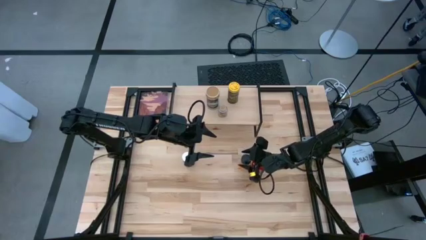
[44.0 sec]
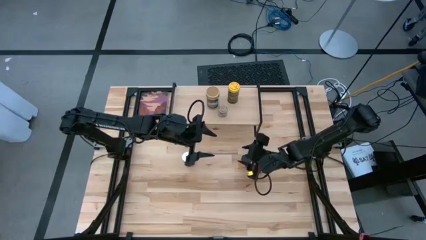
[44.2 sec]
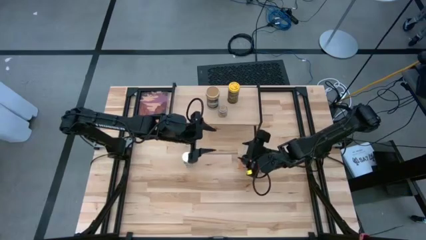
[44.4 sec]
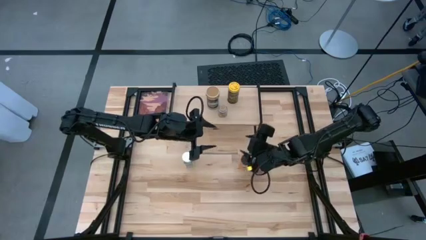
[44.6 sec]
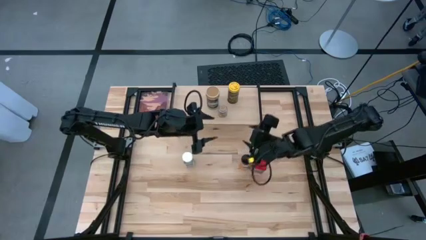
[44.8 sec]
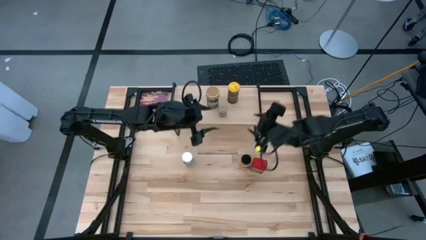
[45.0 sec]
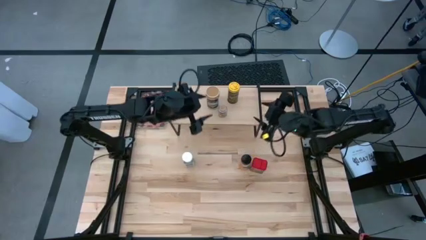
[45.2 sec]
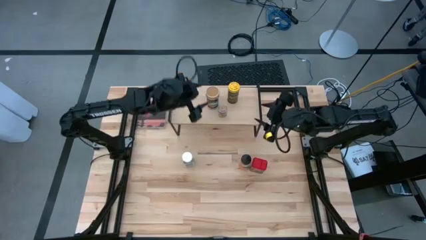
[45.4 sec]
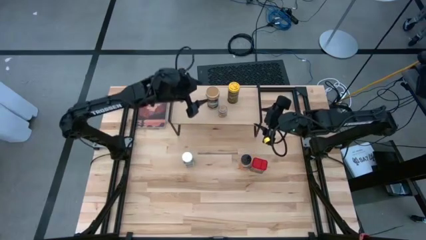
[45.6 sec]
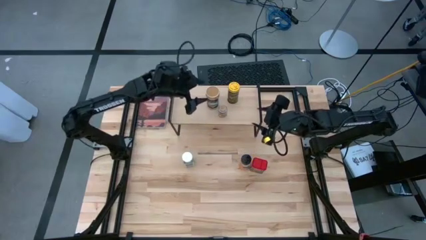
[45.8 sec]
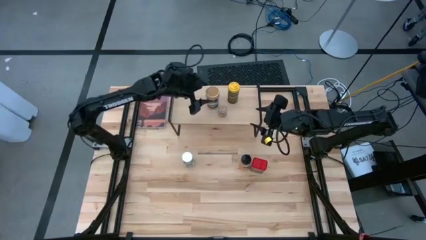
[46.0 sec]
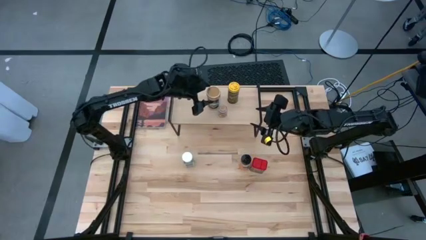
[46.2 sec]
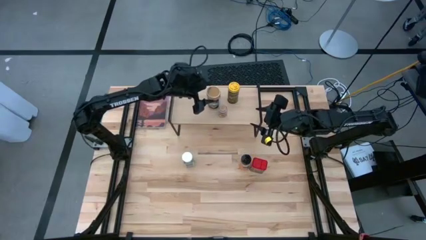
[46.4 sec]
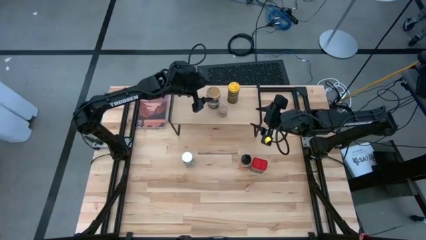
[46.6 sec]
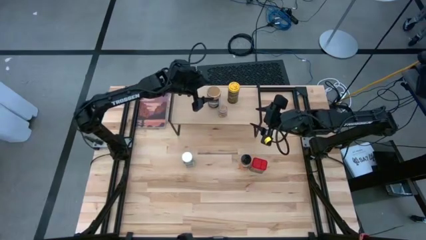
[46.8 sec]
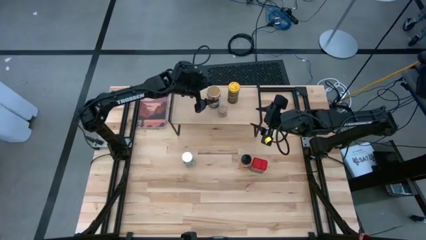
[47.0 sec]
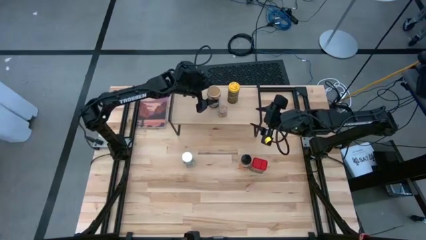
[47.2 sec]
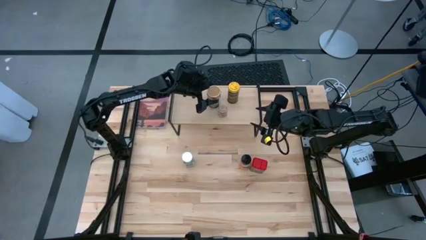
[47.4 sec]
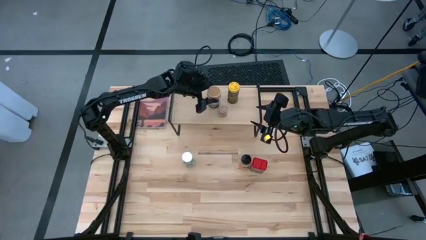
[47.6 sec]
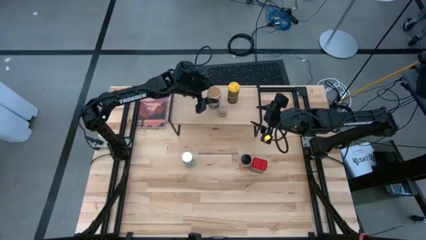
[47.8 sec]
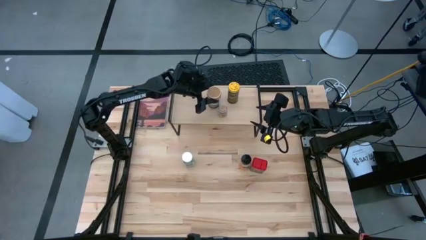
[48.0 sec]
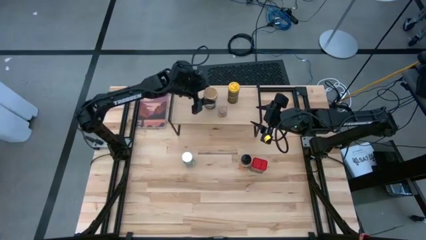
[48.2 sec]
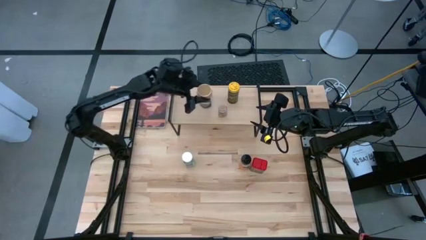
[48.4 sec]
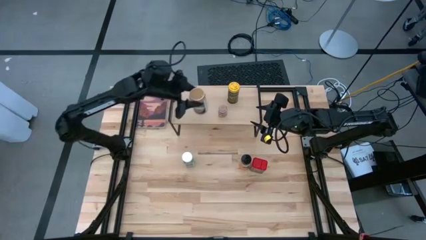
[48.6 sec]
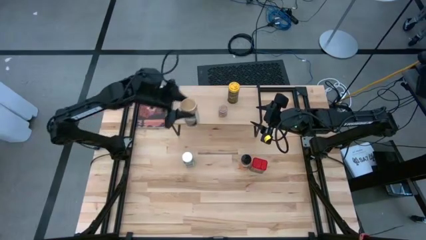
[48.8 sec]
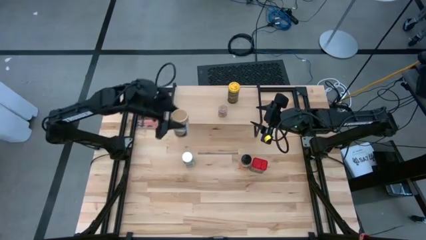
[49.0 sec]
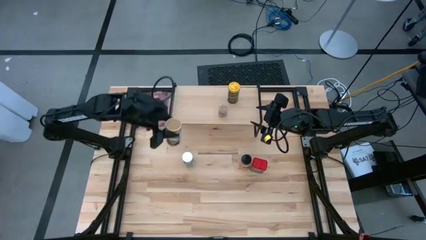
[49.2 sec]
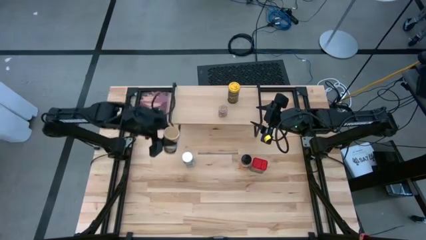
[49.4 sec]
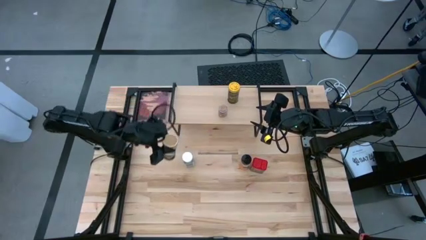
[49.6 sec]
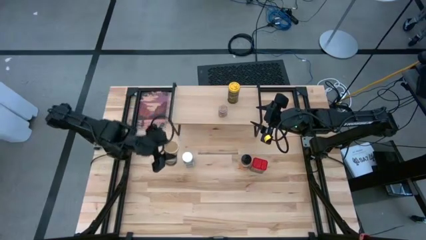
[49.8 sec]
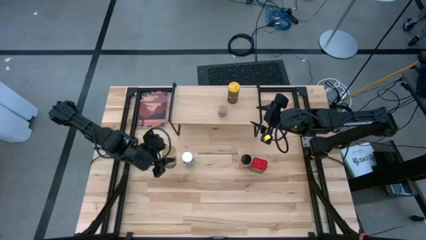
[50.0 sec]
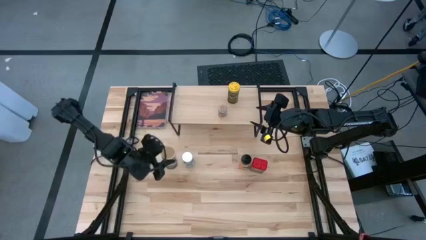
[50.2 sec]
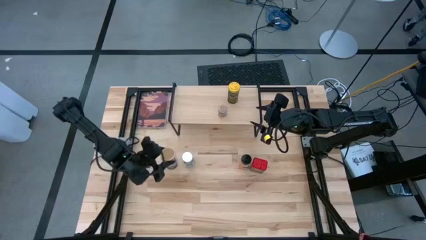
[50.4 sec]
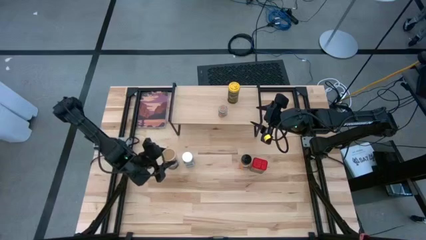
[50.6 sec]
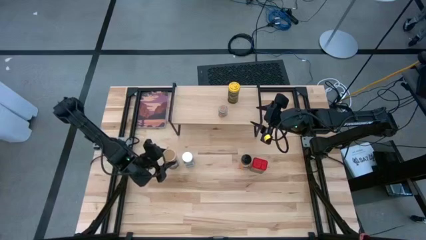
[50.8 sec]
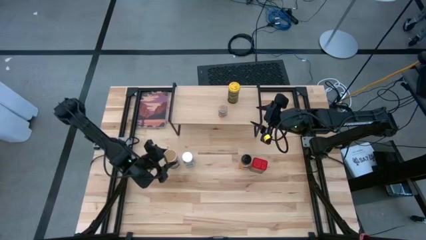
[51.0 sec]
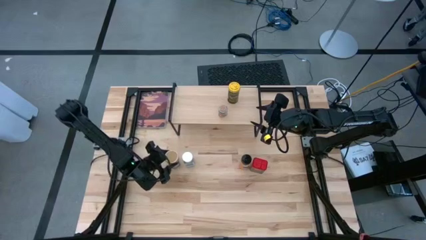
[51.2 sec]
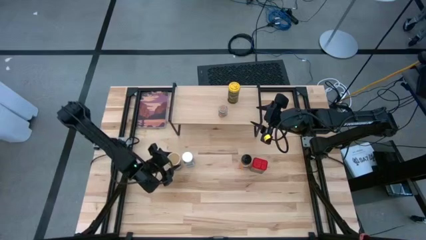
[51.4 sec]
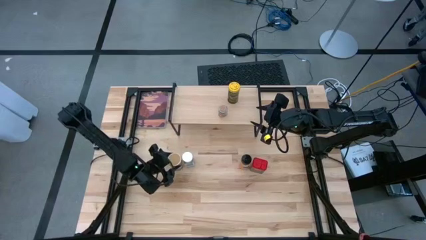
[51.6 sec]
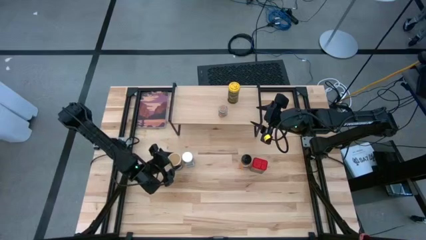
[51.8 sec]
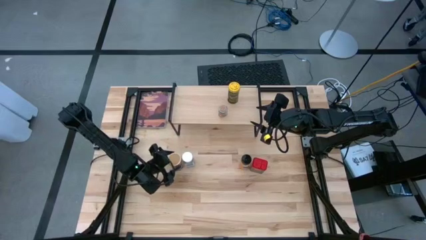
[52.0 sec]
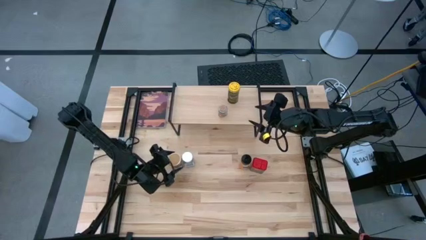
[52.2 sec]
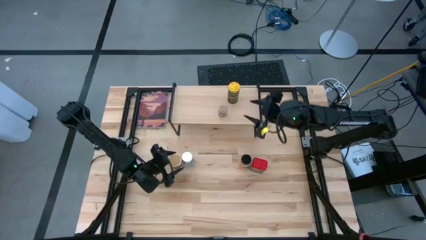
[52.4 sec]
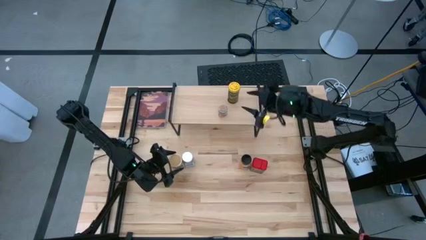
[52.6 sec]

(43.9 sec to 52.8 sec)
Task: Shelf spices
Remove the golden seasoning bottle from the shelf

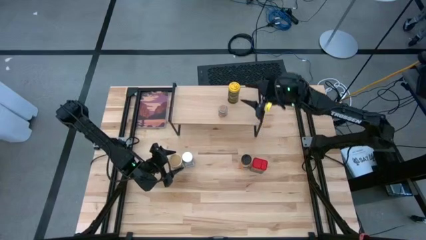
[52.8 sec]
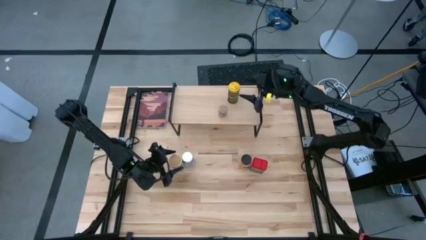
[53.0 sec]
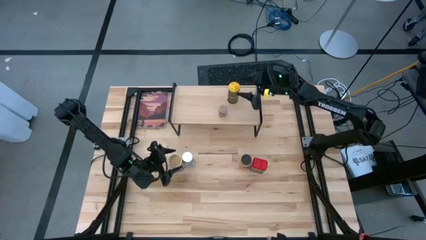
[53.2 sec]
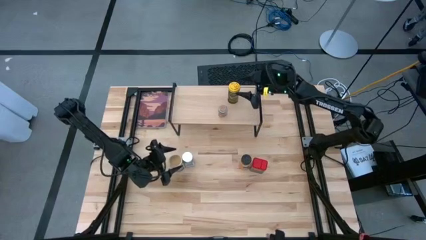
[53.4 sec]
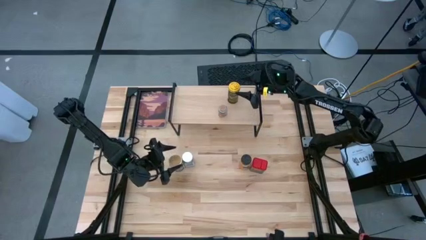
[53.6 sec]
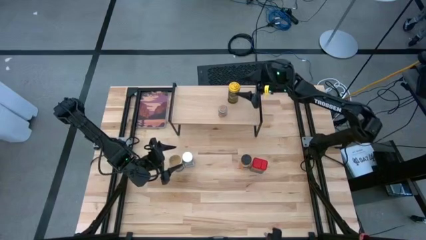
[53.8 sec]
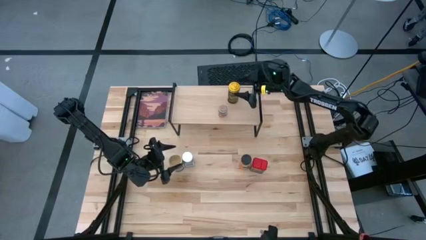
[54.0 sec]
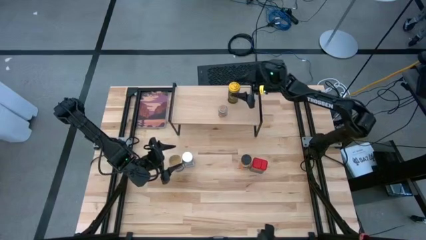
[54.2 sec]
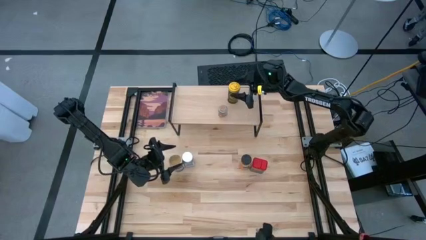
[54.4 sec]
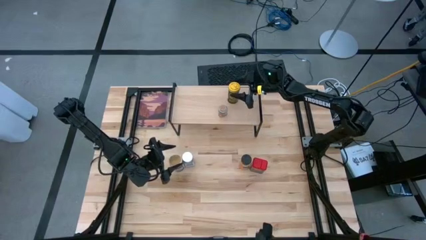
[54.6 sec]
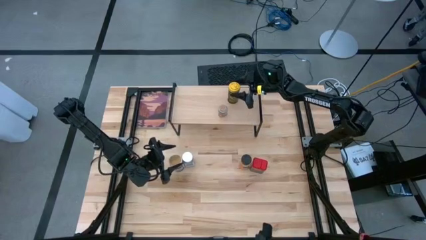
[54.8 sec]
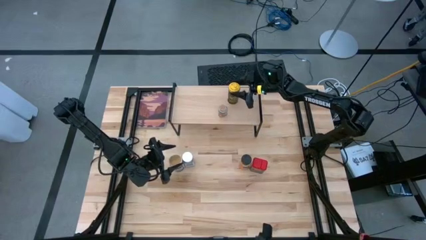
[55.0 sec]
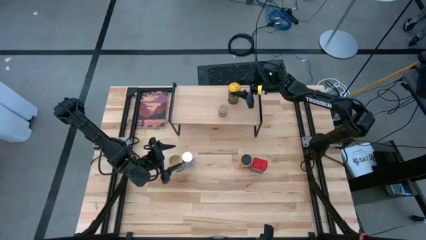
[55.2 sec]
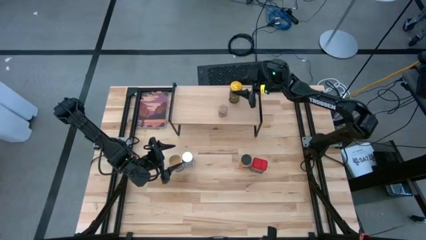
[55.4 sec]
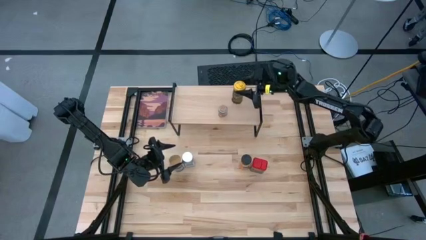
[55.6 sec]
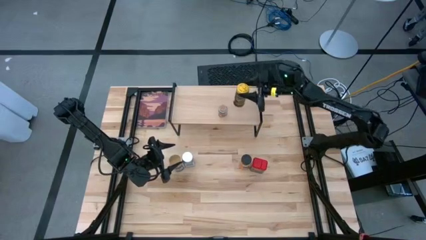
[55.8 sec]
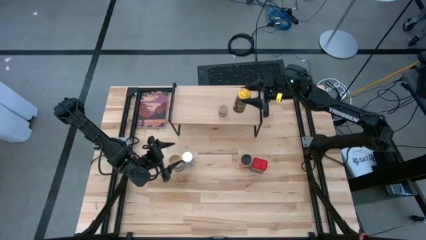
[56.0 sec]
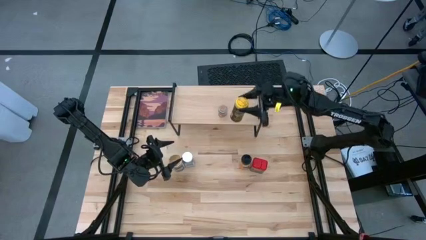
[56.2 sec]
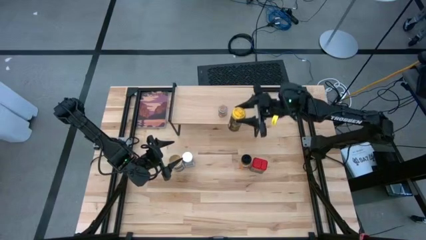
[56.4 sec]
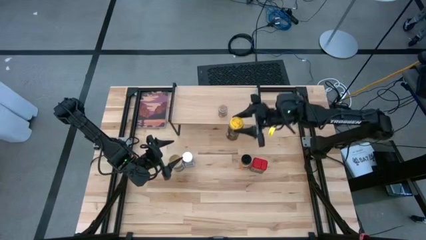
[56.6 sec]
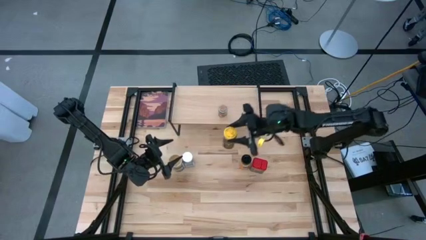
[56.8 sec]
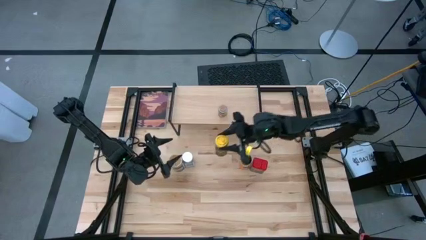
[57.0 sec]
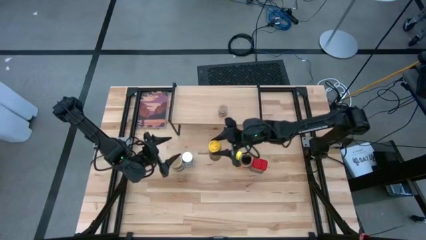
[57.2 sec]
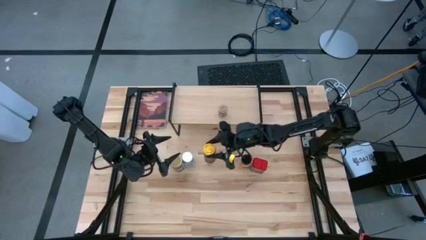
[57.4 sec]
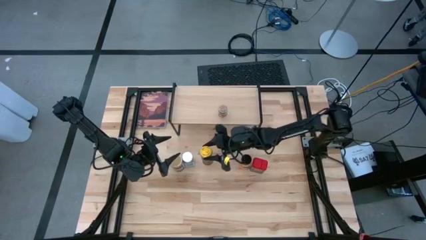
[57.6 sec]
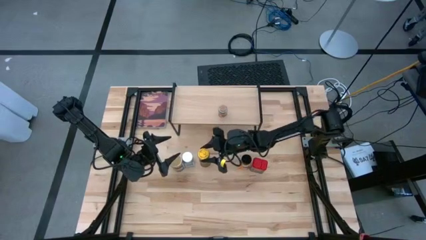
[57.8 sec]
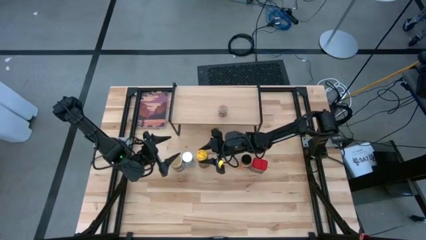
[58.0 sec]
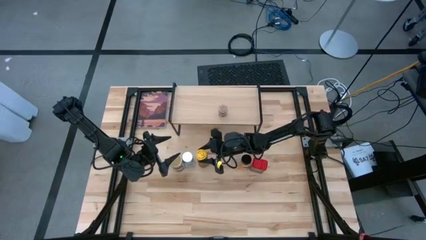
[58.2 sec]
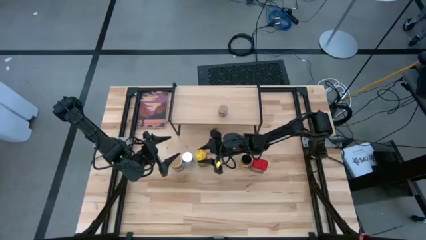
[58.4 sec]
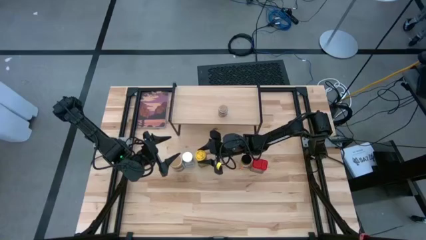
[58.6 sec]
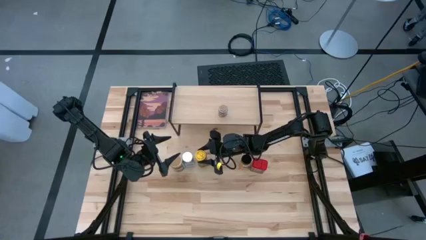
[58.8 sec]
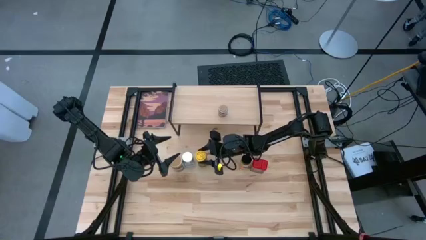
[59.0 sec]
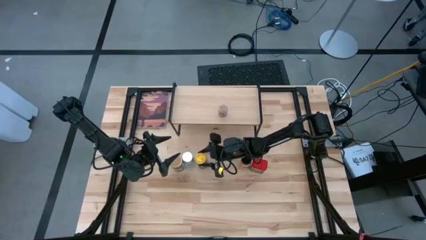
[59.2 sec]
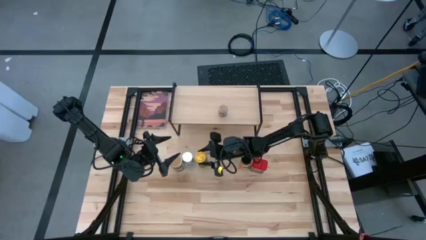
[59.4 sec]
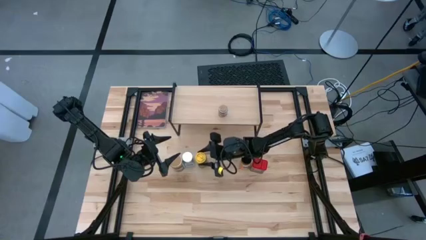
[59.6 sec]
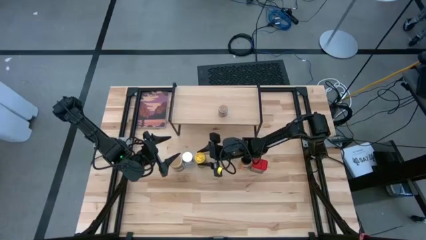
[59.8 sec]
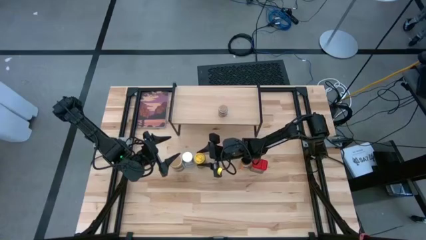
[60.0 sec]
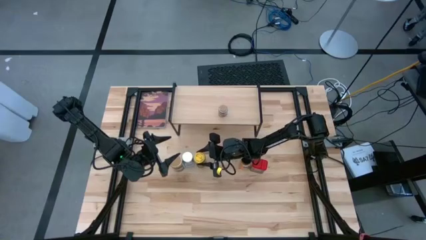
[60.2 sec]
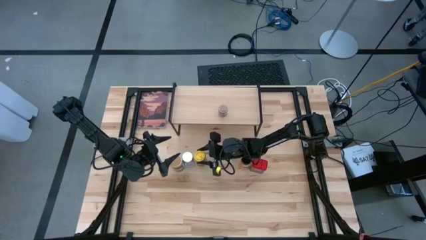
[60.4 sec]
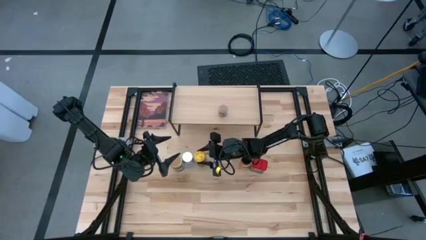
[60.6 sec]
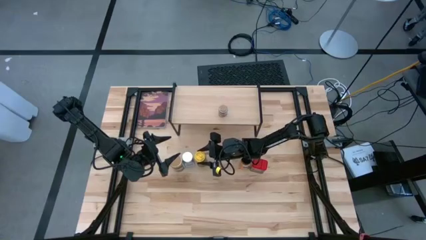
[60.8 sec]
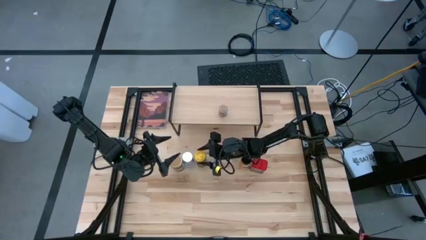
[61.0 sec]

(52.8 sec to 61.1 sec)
Remove the yellow seasoning bottle from the shelf
